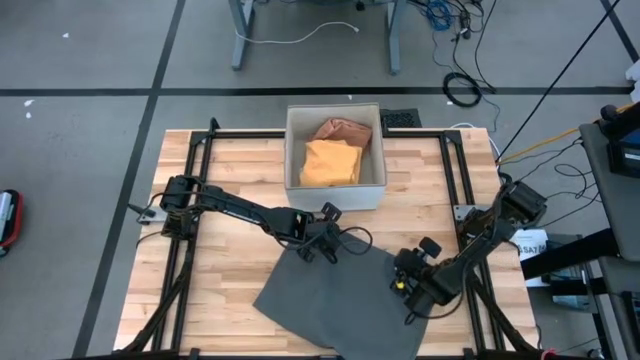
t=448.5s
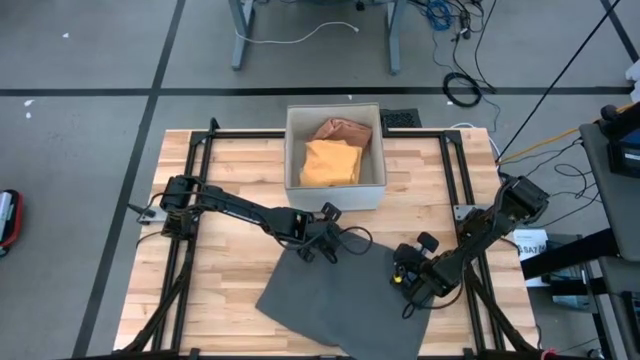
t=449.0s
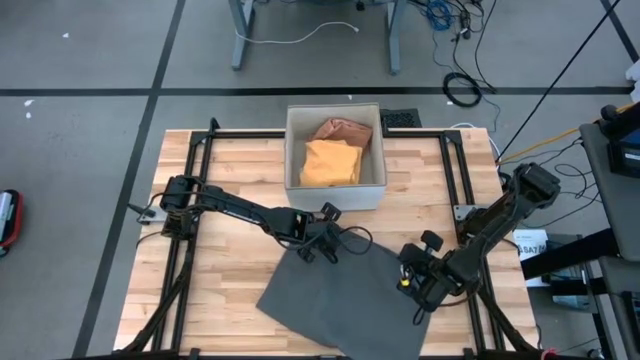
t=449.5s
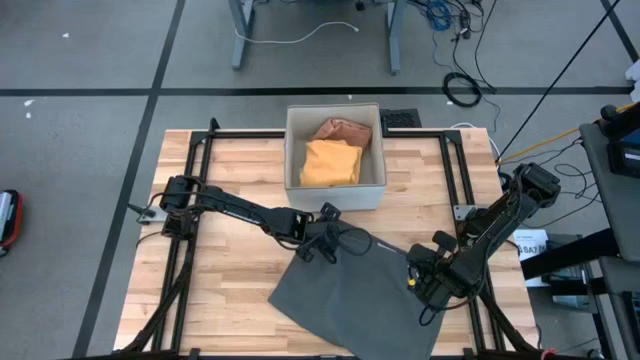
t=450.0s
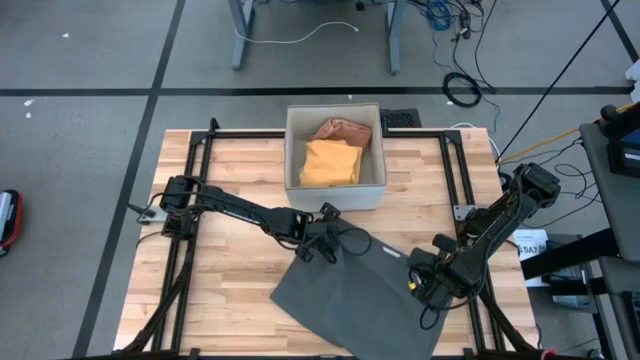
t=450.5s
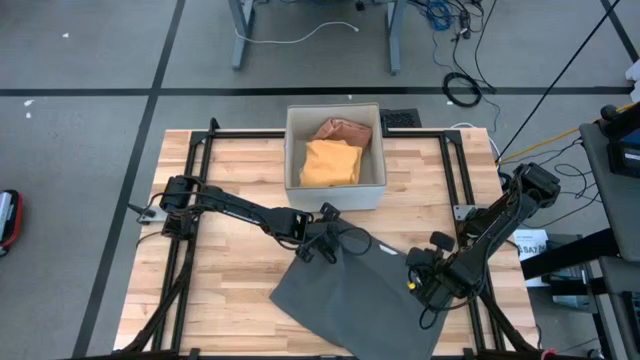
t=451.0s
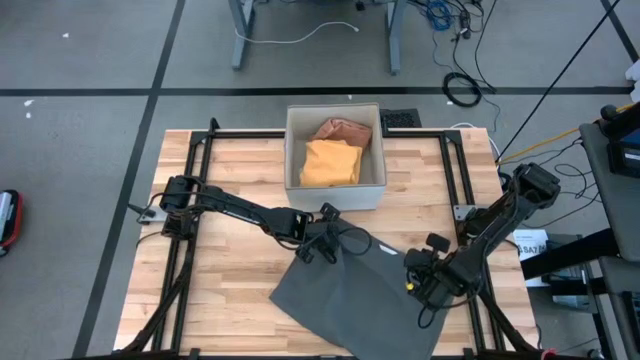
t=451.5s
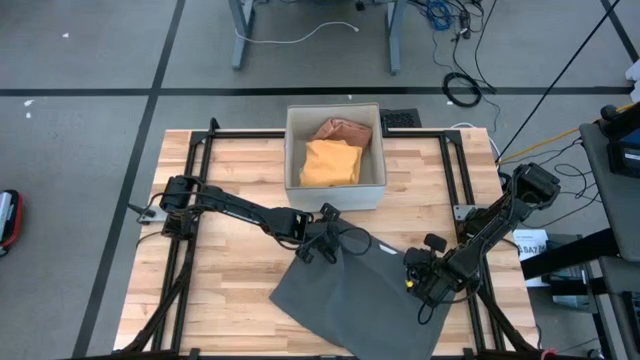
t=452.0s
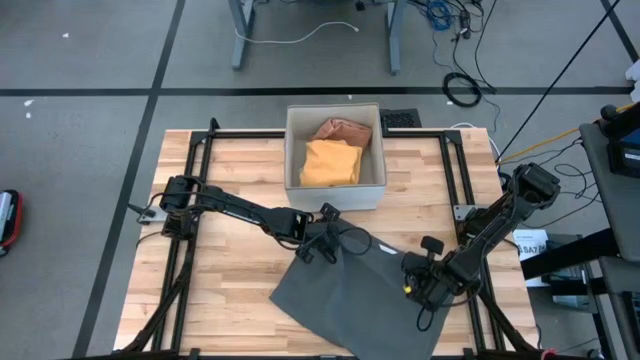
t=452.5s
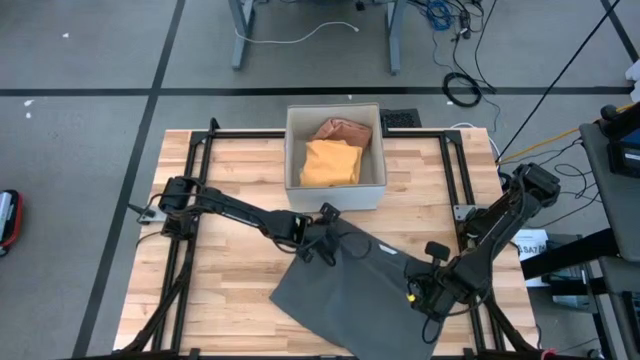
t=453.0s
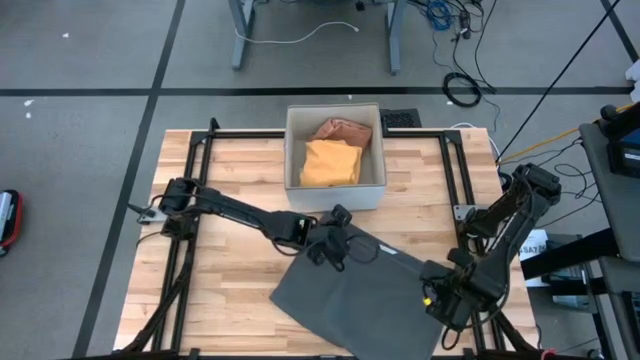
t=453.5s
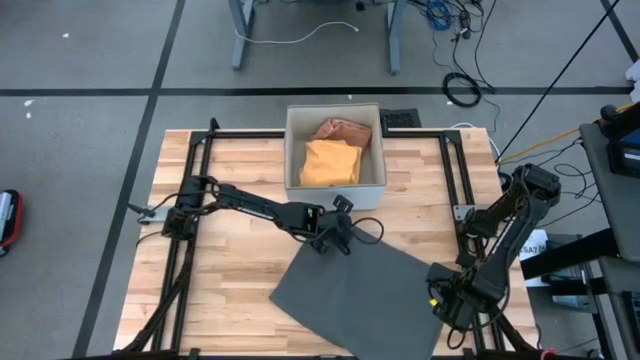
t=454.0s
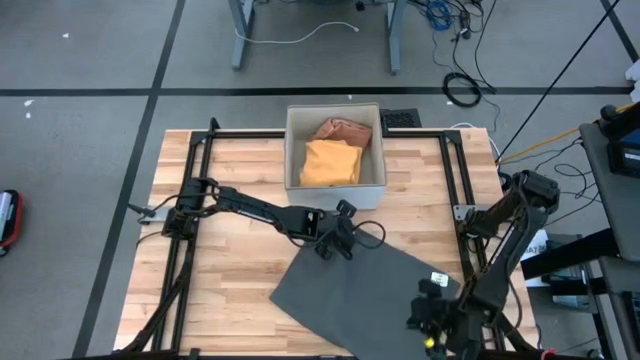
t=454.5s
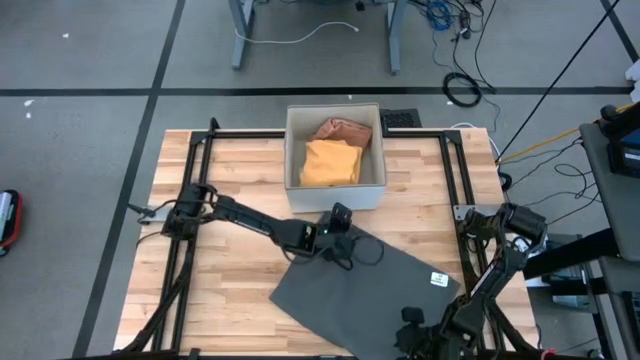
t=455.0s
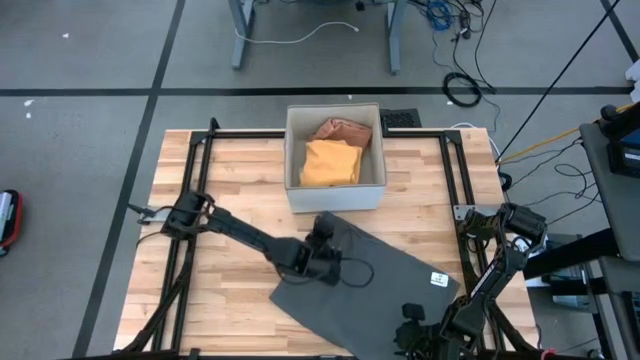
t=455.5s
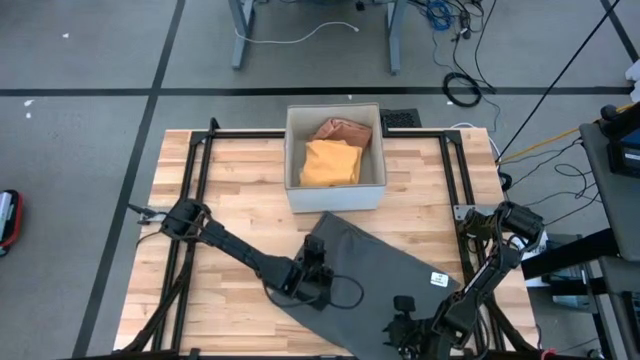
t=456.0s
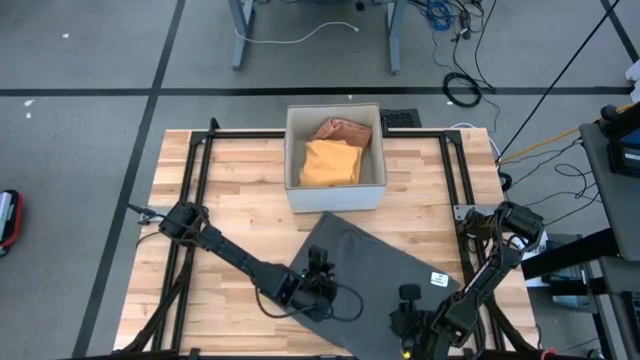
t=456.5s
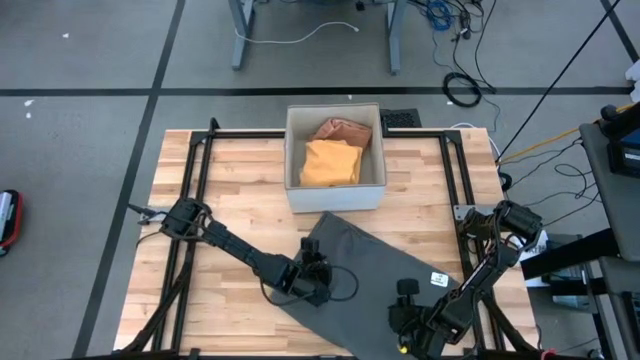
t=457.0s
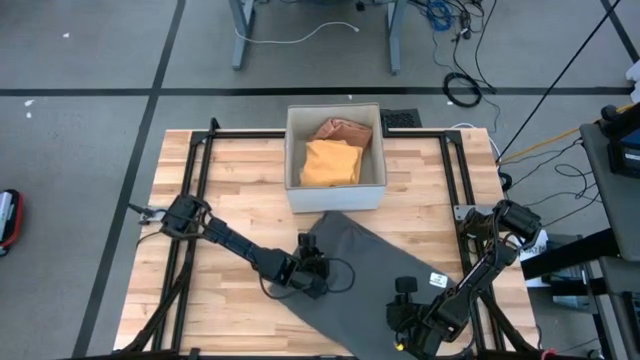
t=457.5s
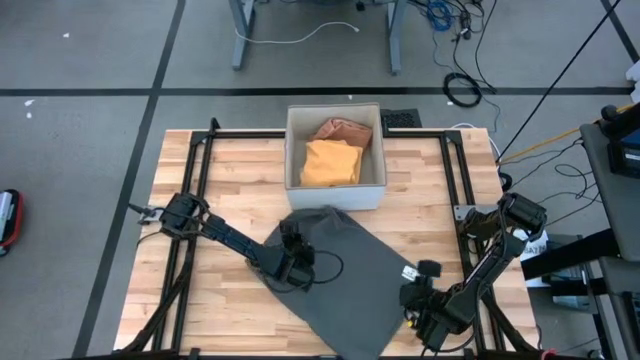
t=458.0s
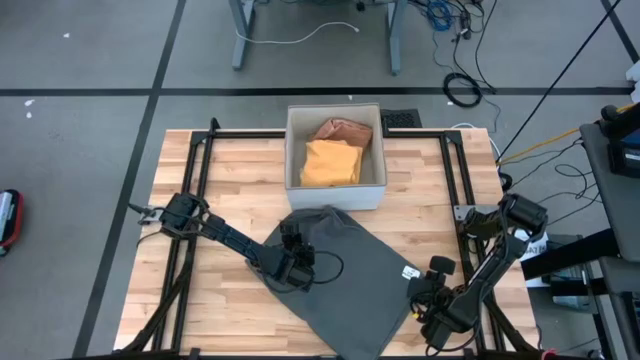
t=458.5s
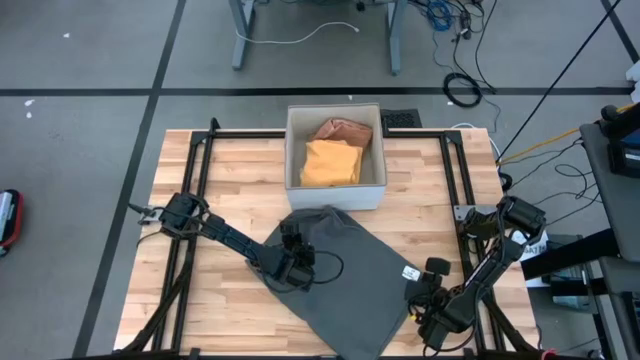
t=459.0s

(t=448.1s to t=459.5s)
Task: Fold towel
Fold the gray towel

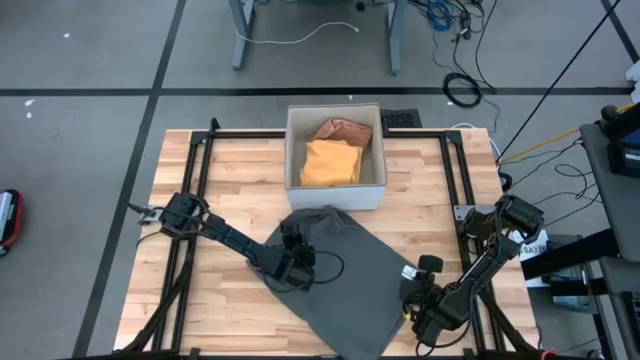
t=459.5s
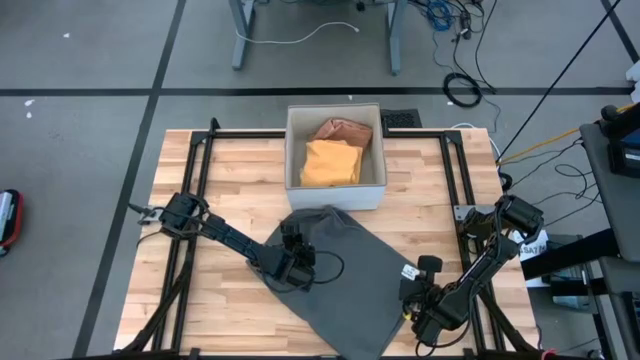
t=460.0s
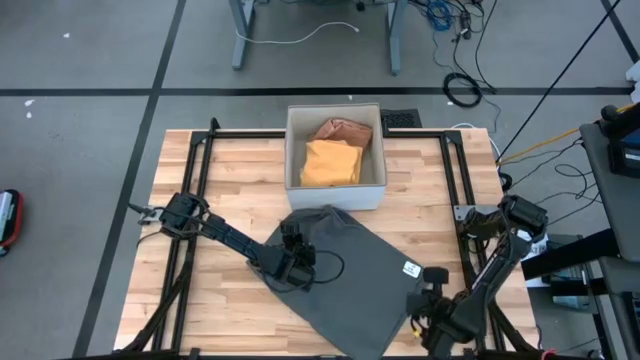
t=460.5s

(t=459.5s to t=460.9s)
Fold the gray towel
